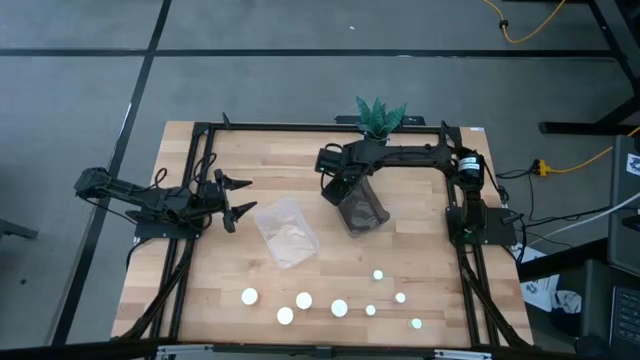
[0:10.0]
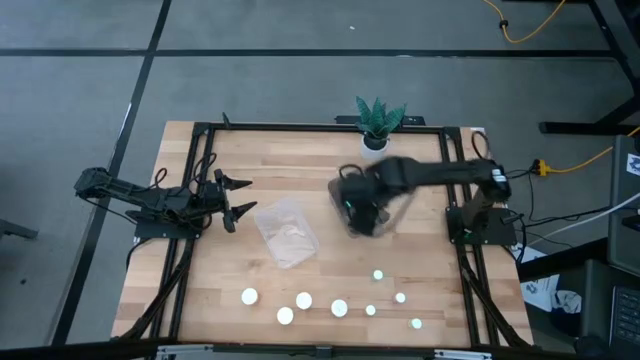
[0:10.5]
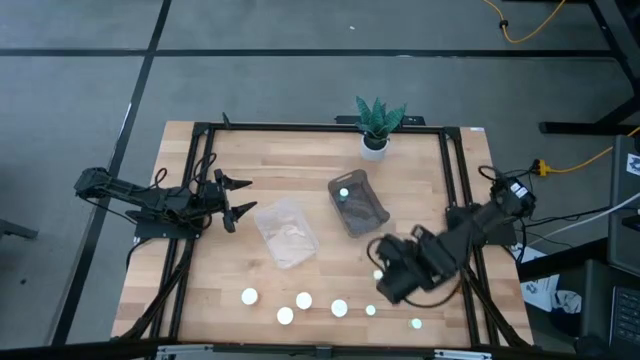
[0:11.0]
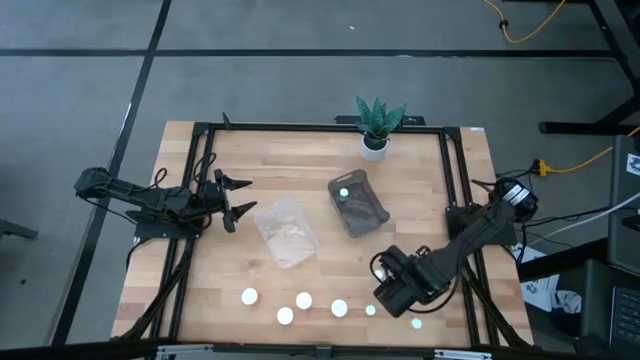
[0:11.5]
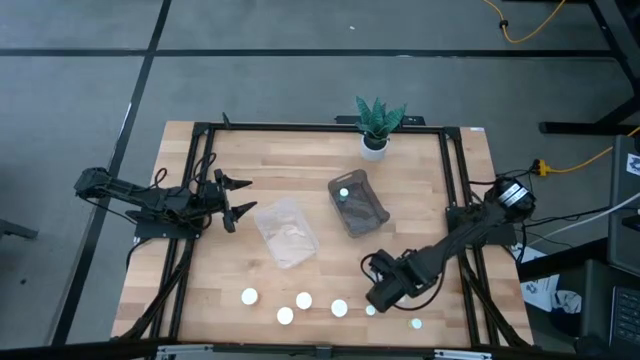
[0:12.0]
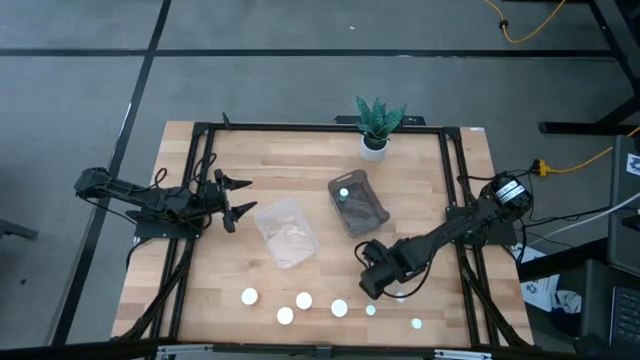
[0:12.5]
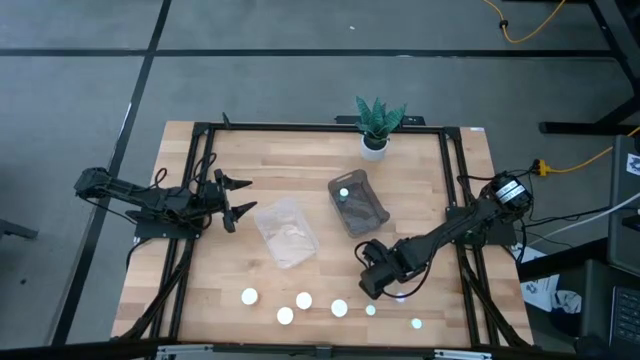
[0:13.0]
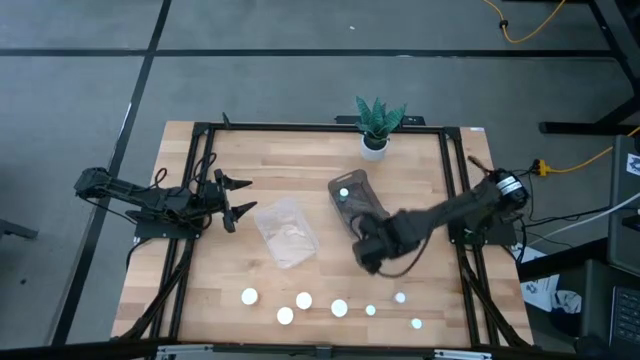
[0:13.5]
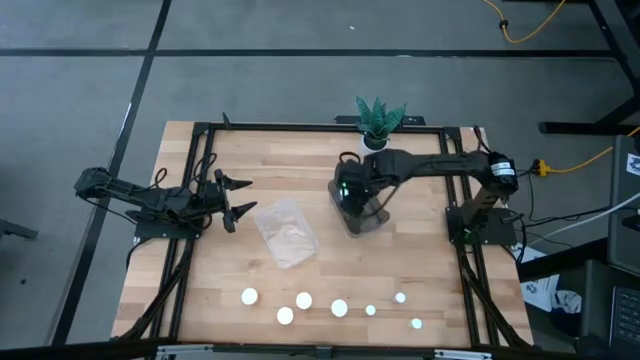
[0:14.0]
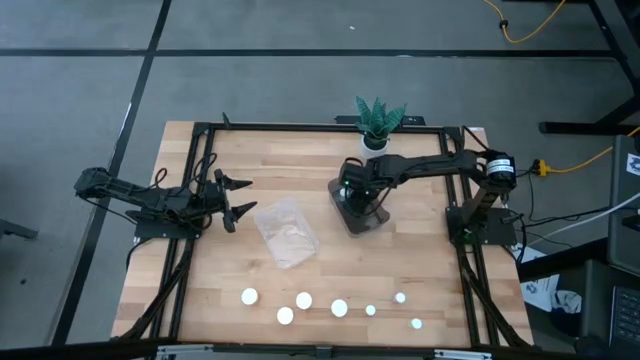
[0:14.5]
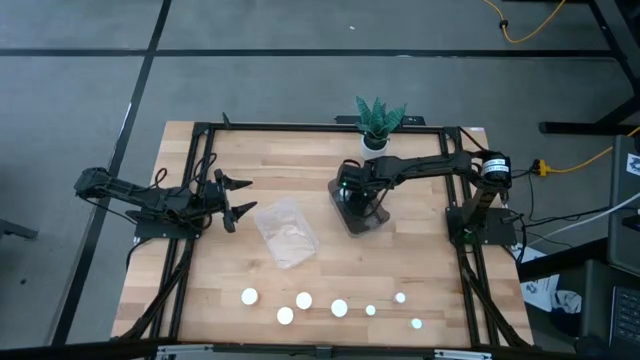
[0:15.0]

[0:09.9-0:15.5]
Task: Pick and place medicine bottles into bin by pill shape (circle, oval)
Put the small blue pill bottle into the black bin

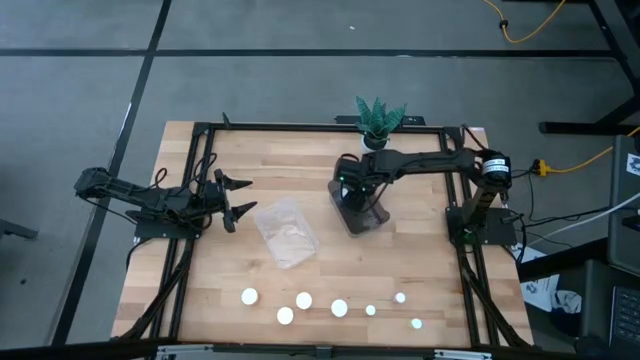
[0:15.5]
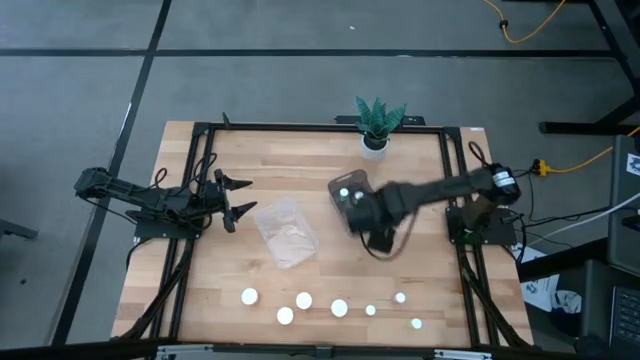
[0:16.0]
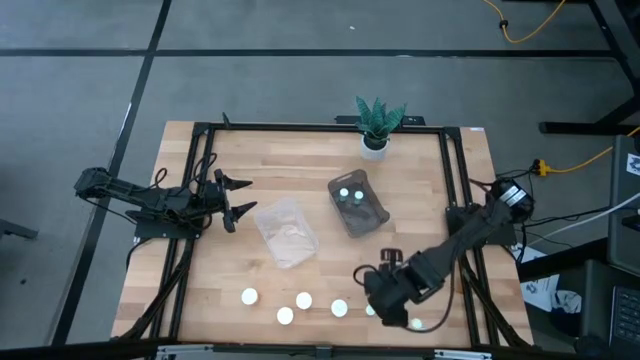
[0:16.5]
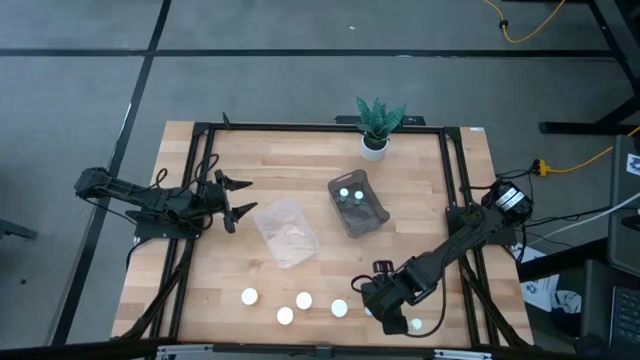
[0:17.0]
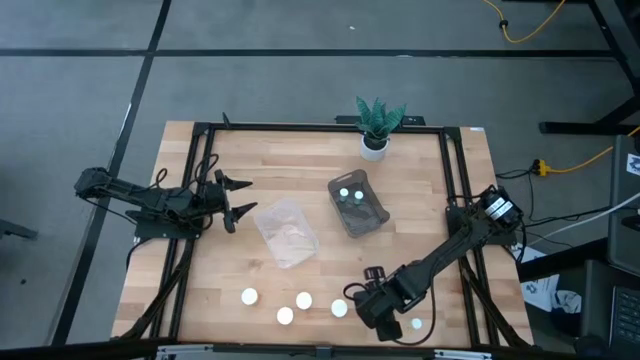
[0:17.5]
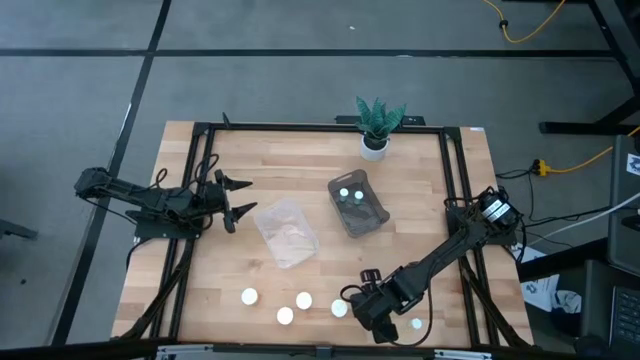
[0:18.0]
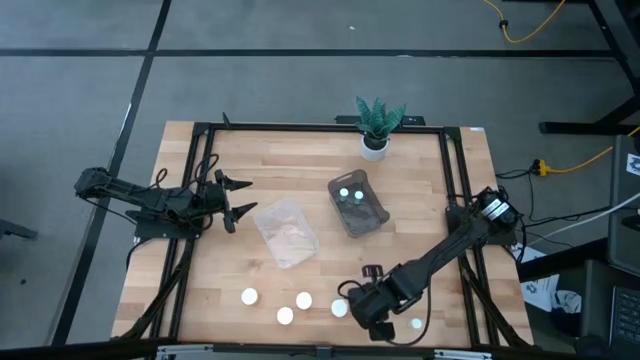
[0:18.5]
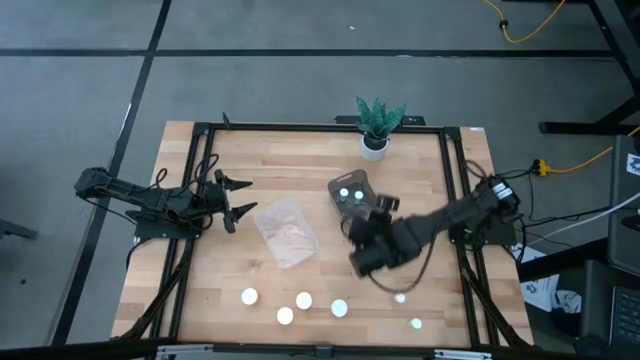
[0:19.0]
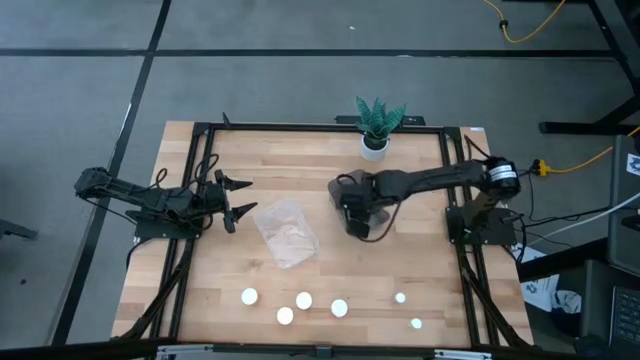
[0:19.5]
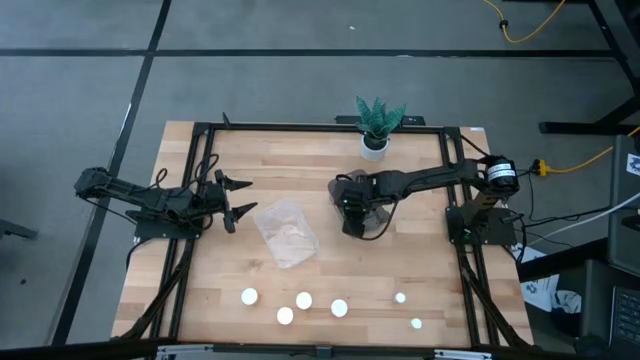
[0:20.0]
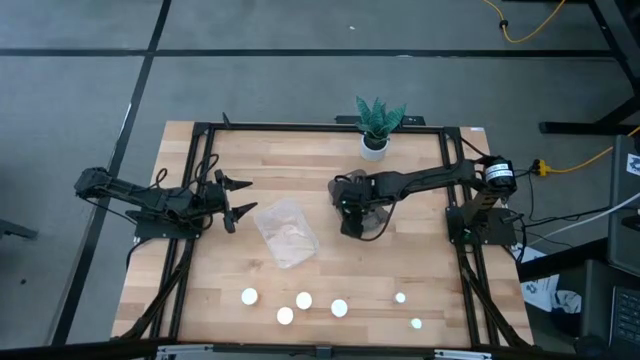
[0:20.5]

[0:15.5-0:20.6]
Put the small yellow pill bottle into the black bin

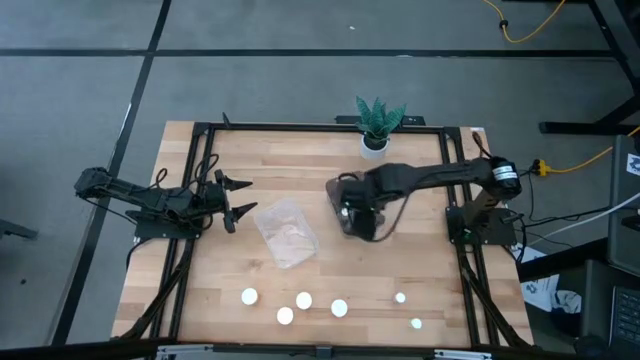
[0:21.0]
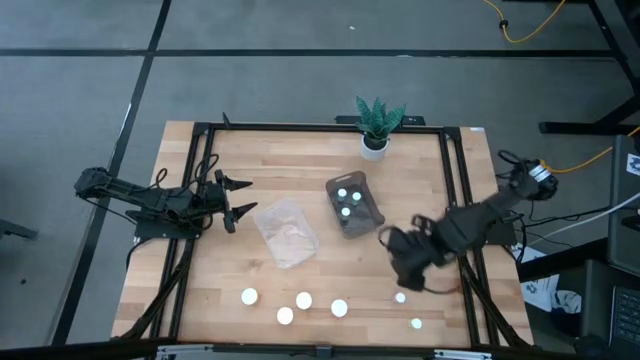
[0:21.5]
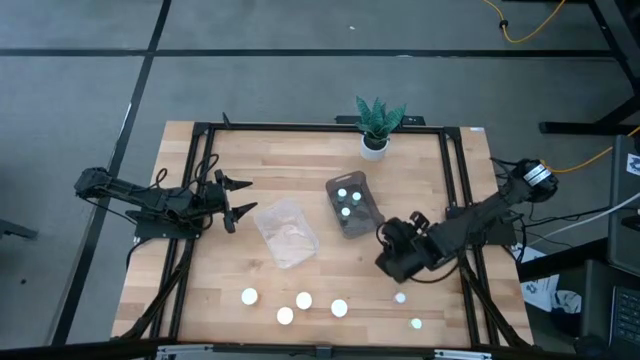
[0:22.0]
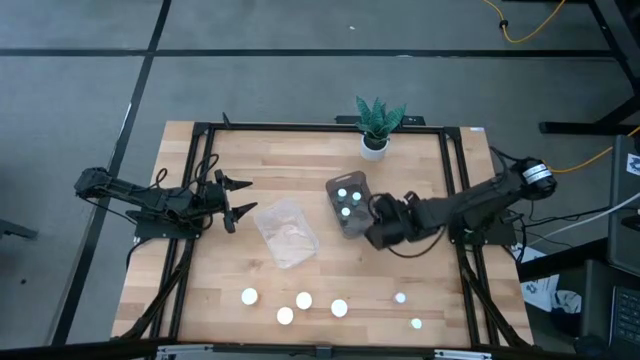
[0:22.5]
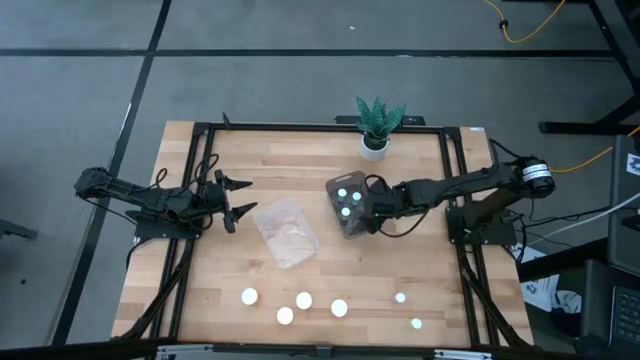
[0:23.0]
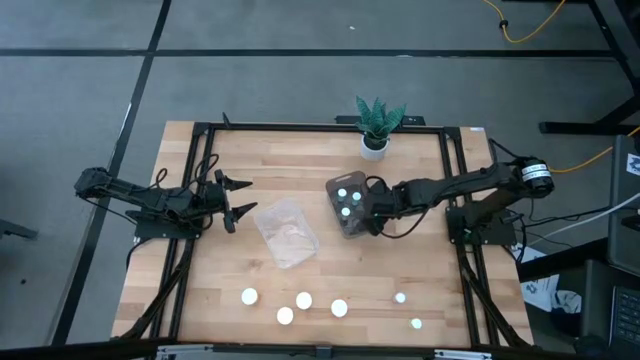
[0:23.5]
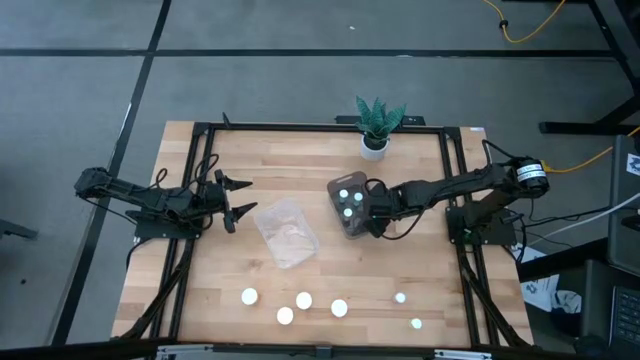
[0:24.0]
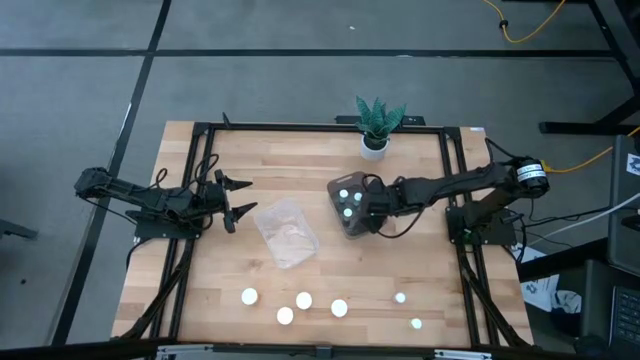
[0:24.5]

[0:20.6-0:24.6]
Adjust the black bin

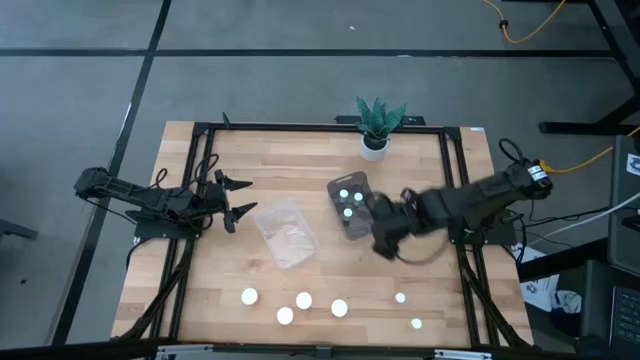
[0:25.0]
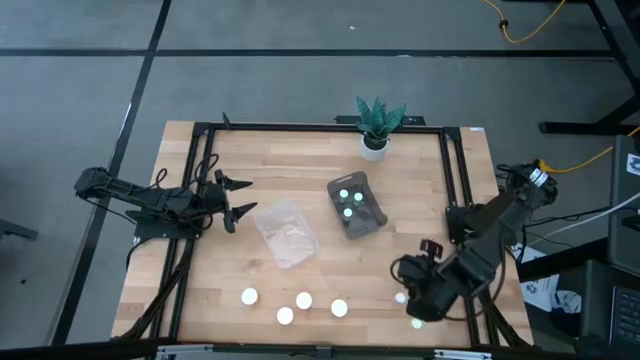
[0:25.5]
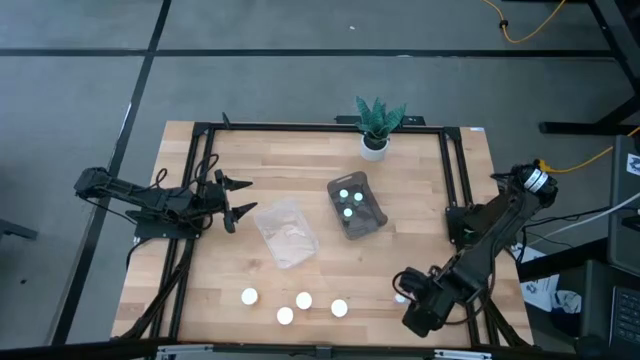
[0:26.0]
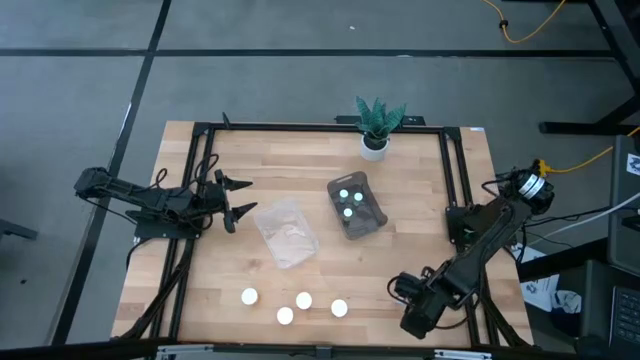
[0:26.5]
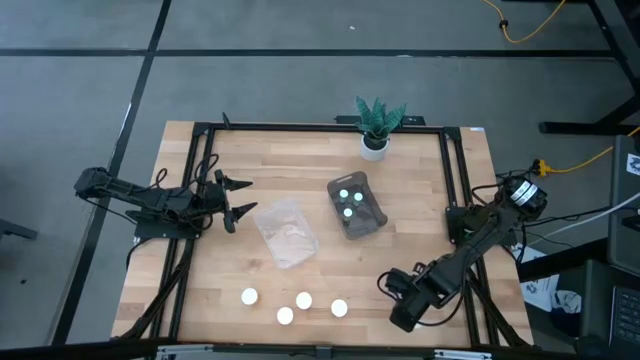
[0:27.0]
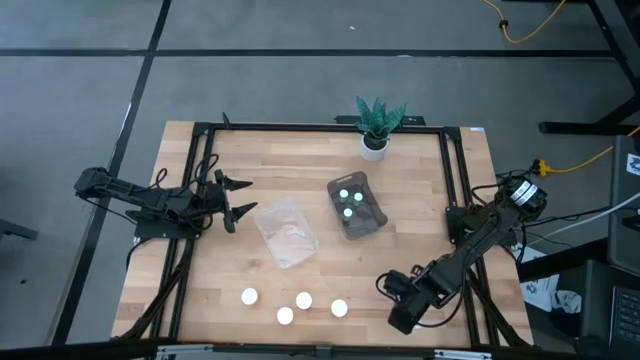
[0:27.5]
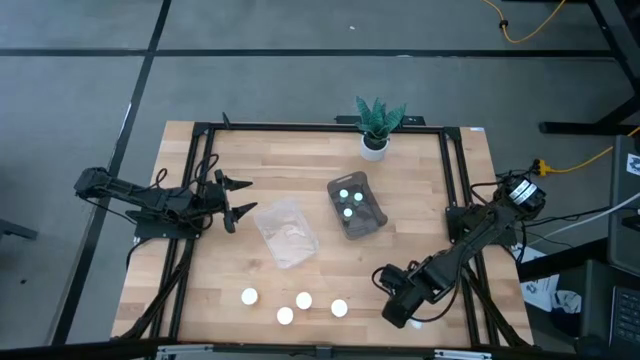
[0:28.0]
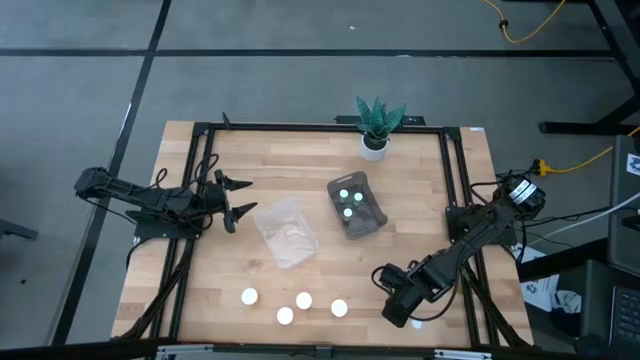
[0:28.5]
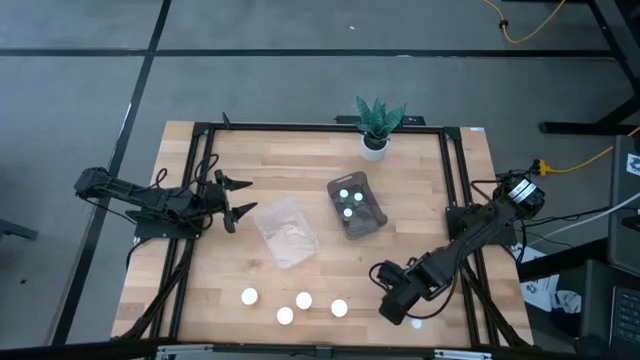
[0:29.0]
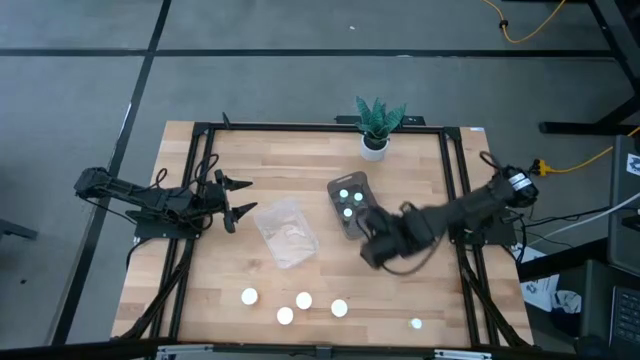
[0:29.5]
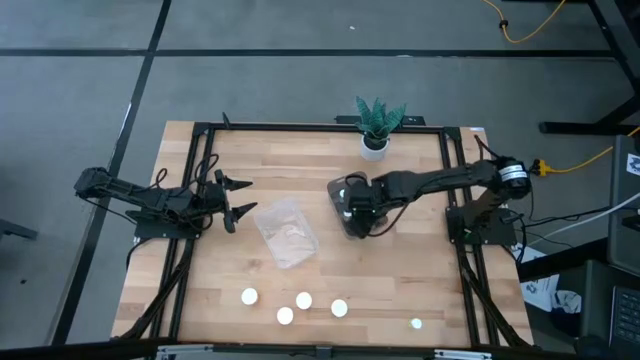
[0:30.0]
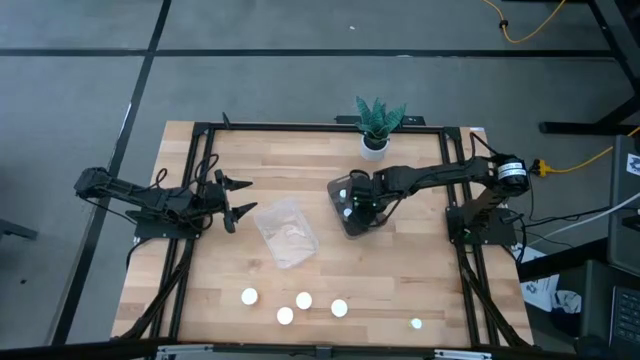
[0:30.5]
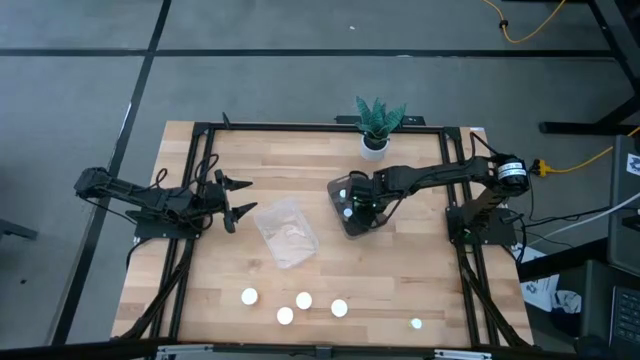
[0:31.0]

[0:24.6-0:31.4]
Put the small pink pill bottle into the black bin

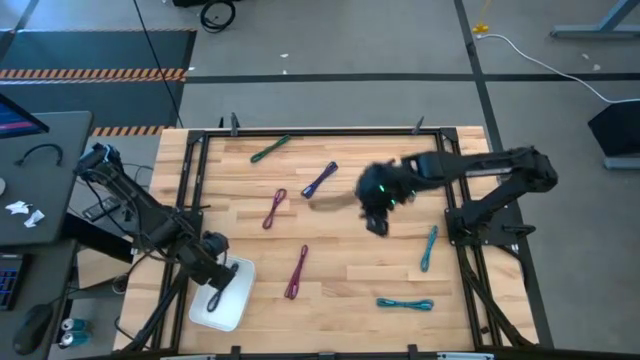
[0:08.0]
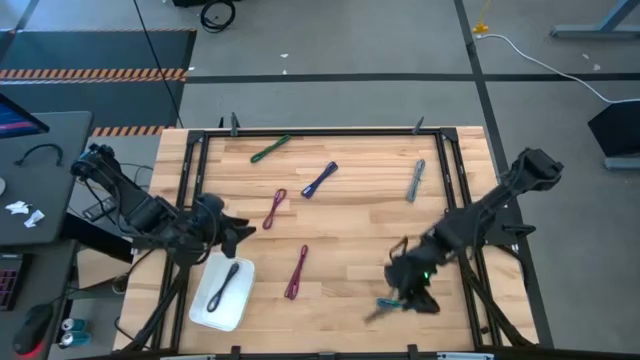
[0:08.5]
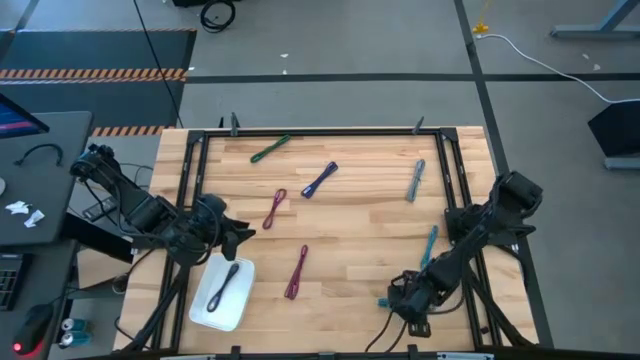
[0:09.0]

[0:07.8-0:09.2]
Task: Pick and place USB-C Cables
Put the bottom blue charger cable into the white bin
